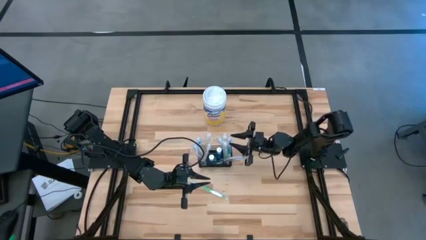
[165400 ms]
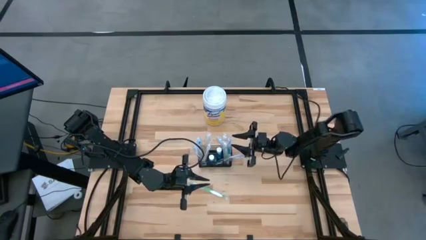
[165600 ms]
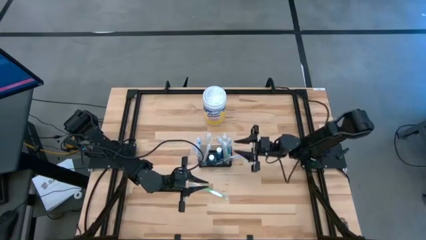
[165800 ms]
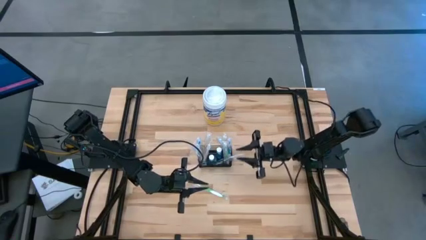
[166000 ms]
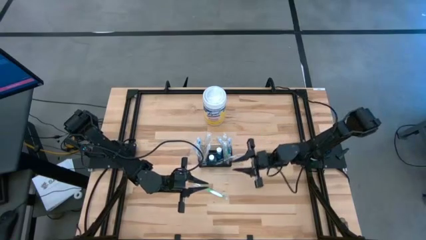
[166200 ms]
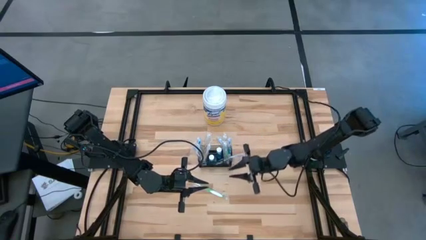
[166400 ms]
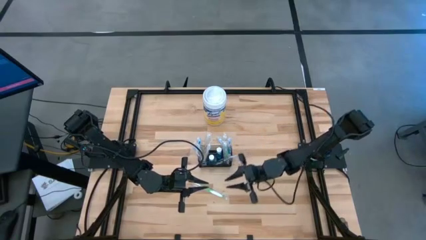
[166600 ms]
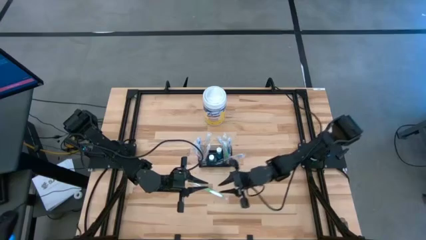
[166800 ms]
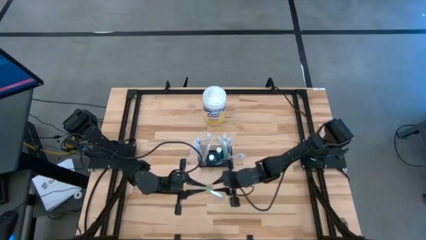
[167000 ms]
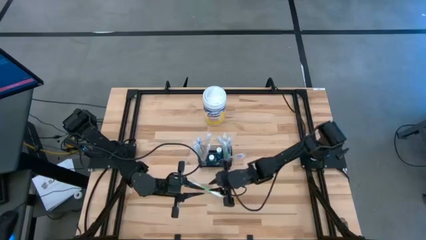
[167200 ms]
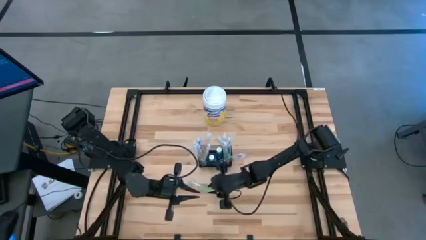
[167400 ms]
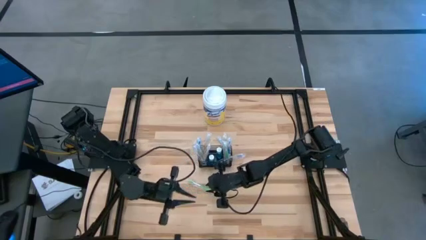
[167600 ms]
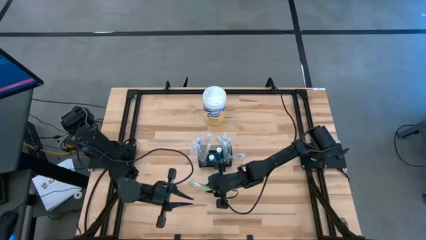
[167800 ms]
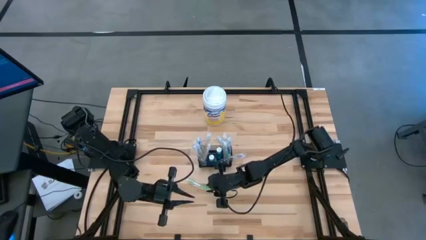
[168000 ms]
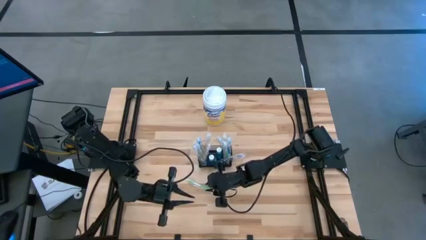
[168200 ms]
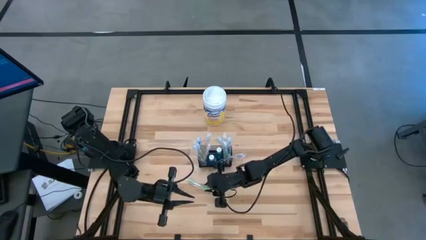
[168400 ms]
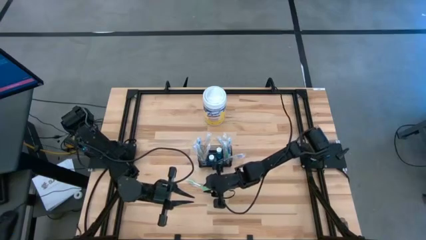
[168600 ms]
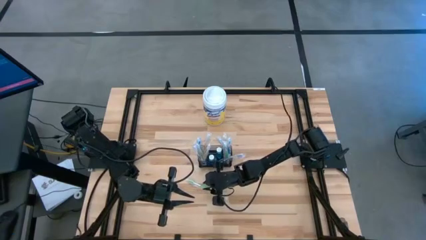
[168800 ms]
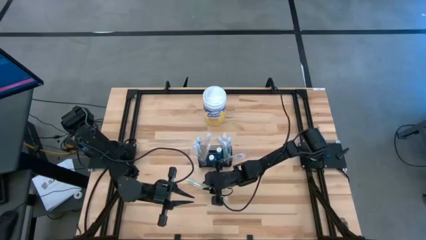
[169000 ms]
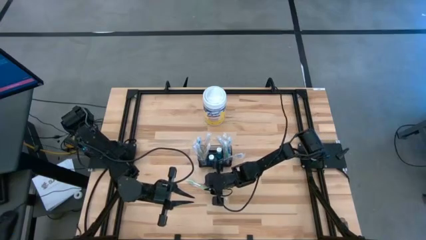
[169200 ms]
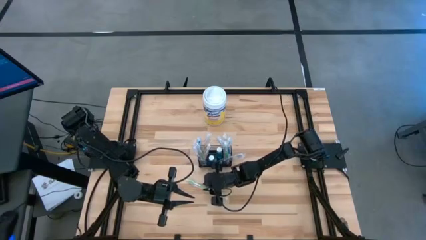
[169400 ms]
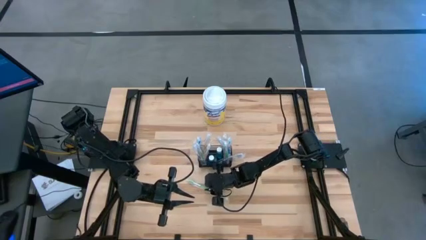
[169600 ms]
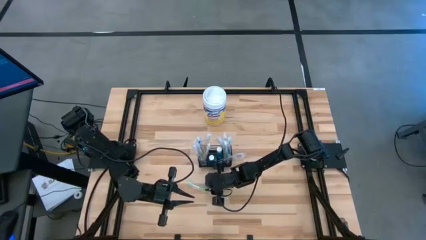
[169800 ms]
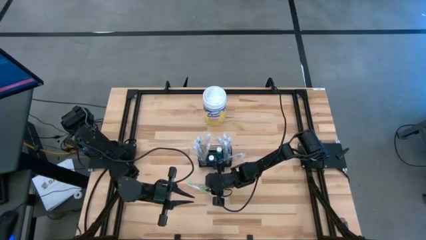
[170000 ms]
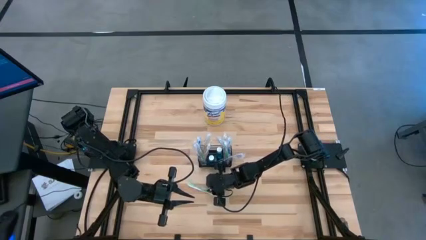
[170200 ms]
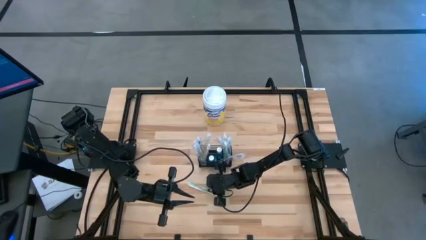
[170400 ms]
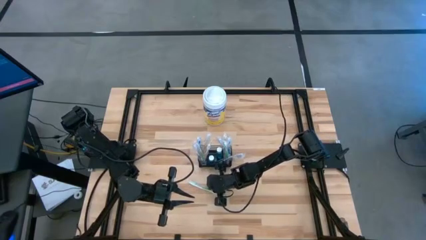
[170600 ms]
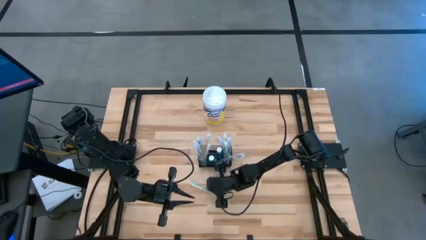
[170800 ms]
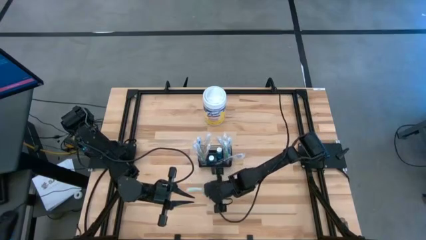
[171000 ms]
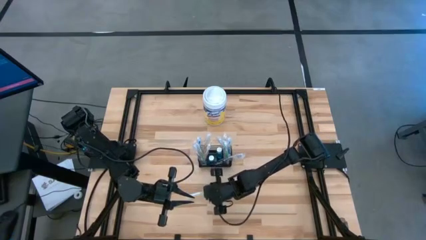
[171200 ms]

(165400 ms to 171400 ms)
Task: Pick & Place toothbrushing station
Put the green toothbrush into the mesh organizer

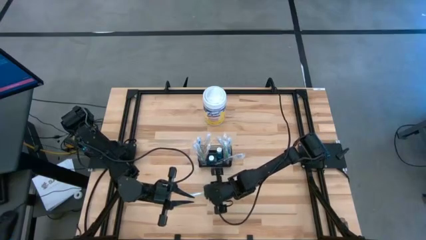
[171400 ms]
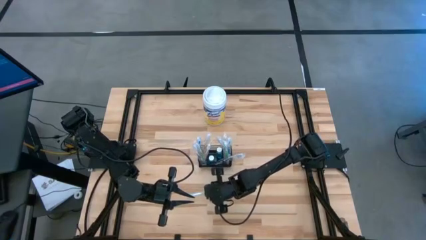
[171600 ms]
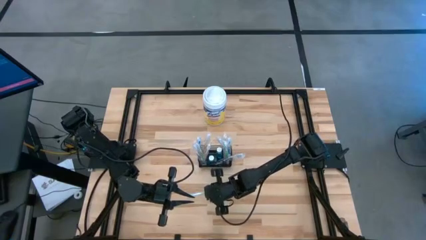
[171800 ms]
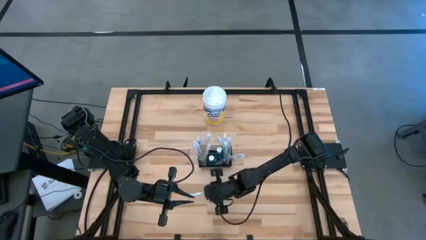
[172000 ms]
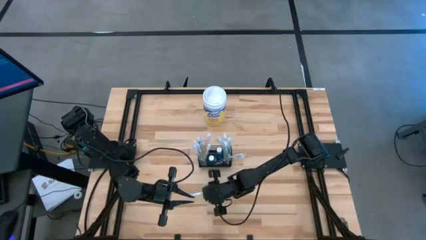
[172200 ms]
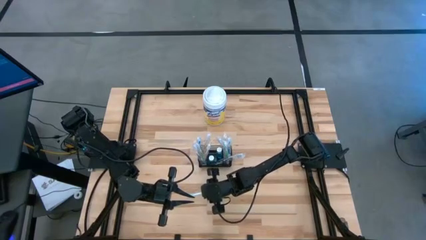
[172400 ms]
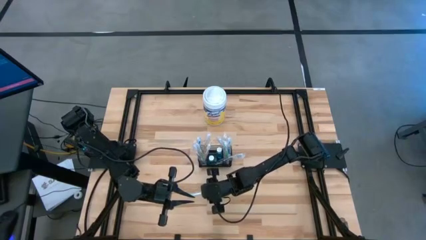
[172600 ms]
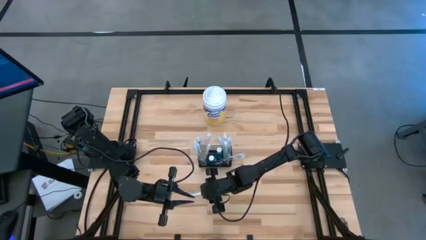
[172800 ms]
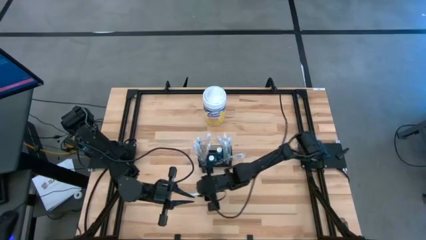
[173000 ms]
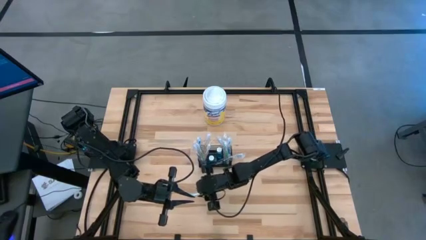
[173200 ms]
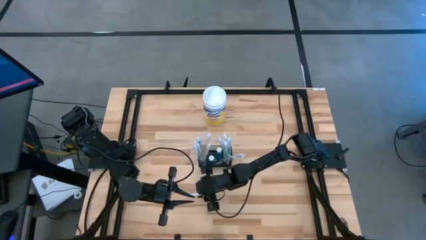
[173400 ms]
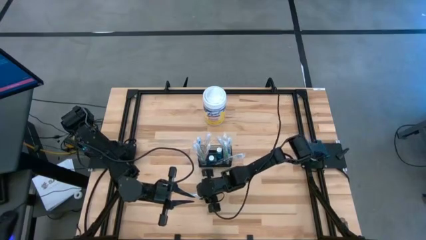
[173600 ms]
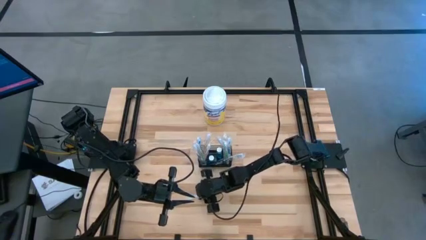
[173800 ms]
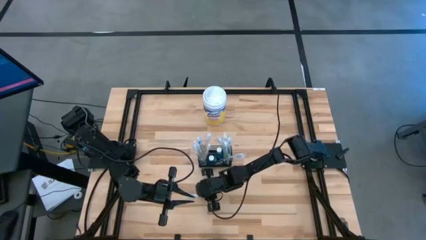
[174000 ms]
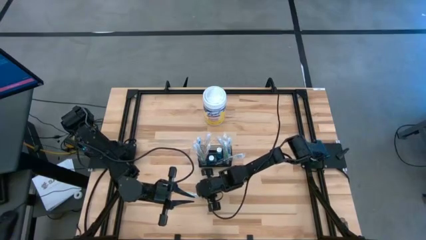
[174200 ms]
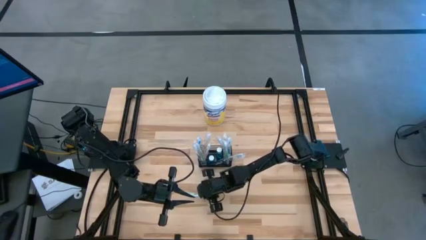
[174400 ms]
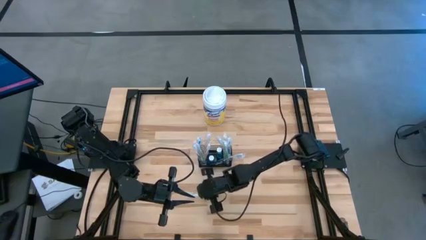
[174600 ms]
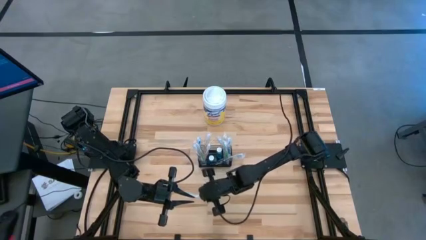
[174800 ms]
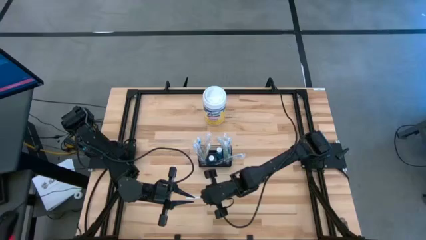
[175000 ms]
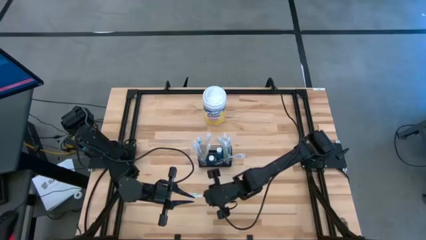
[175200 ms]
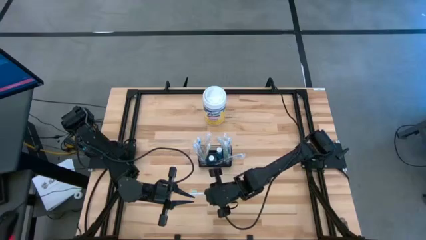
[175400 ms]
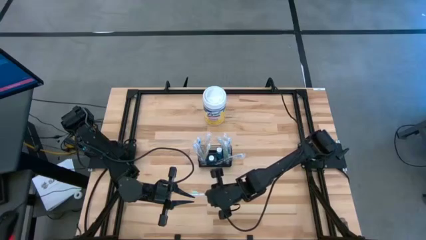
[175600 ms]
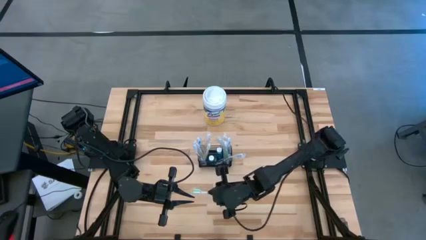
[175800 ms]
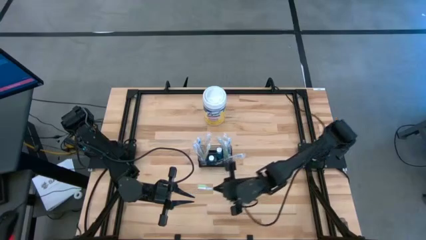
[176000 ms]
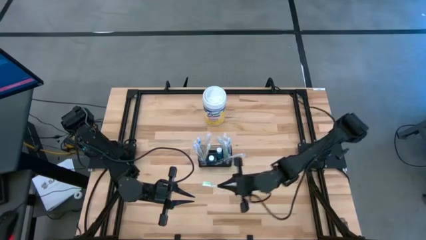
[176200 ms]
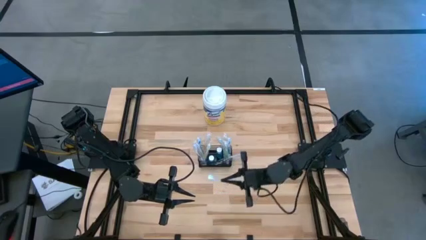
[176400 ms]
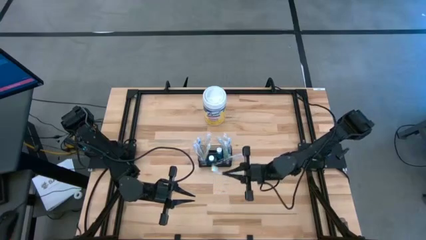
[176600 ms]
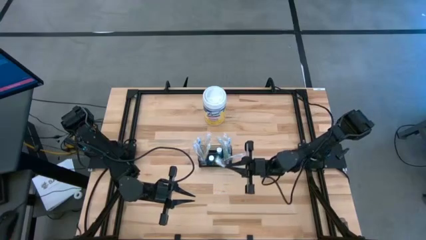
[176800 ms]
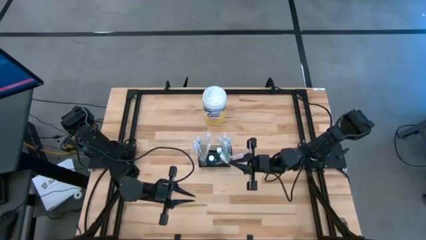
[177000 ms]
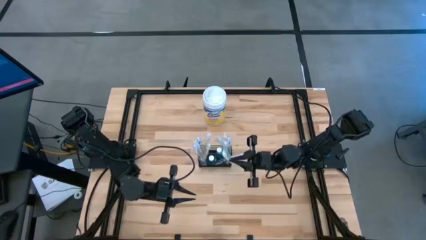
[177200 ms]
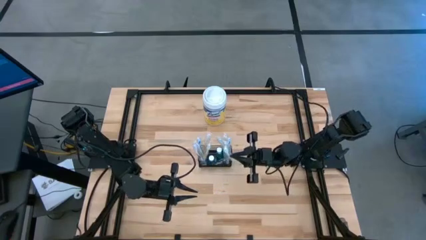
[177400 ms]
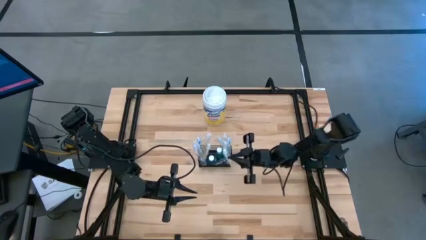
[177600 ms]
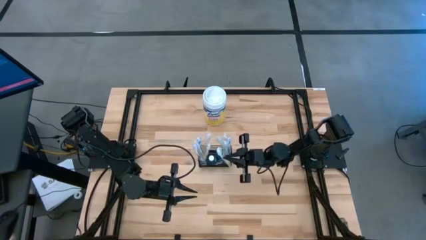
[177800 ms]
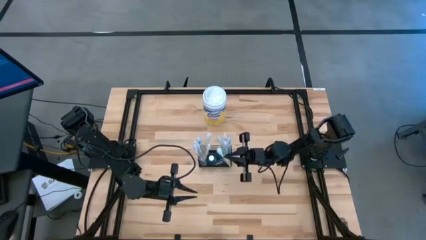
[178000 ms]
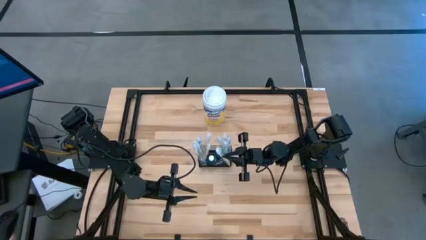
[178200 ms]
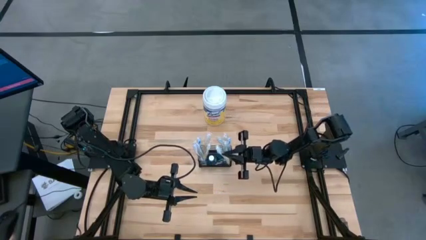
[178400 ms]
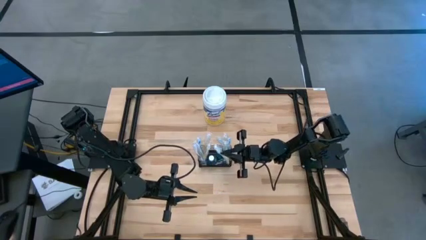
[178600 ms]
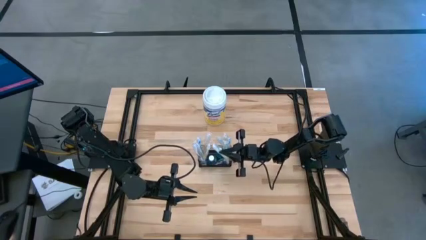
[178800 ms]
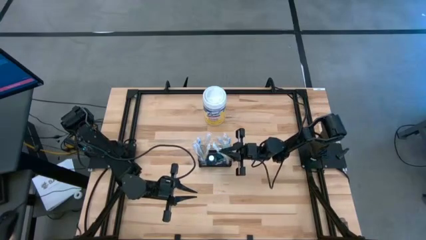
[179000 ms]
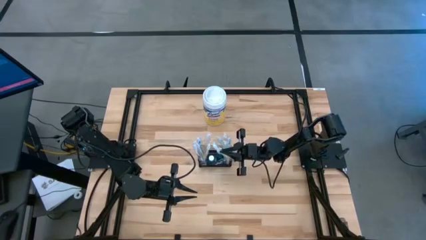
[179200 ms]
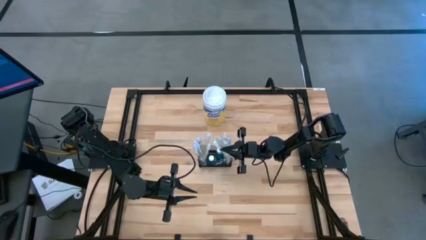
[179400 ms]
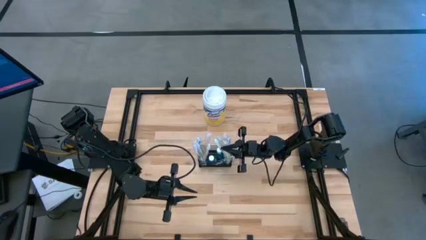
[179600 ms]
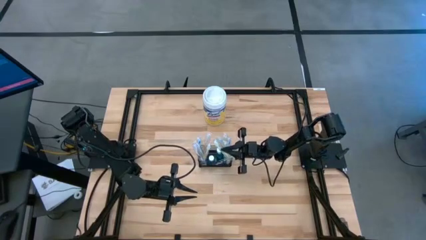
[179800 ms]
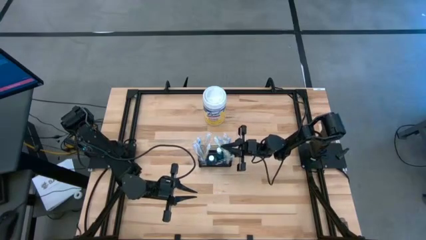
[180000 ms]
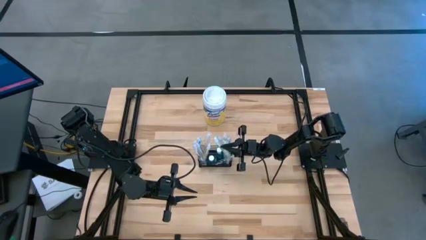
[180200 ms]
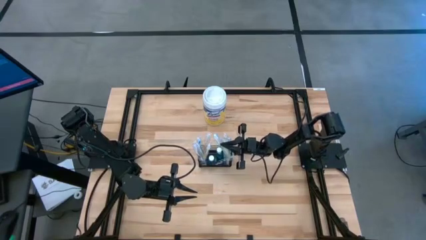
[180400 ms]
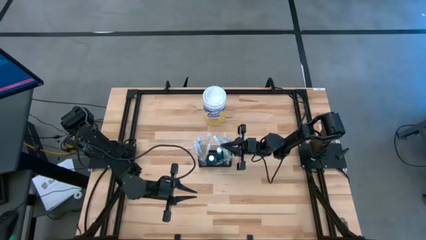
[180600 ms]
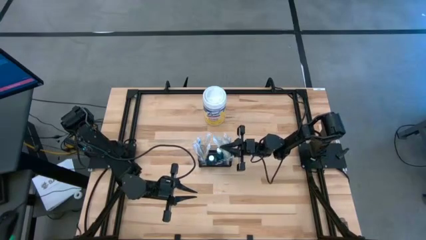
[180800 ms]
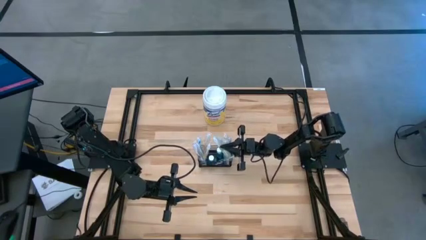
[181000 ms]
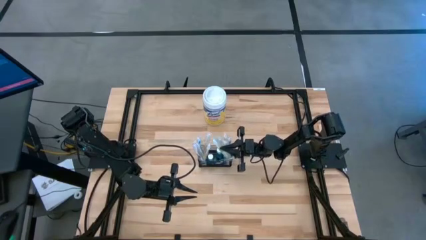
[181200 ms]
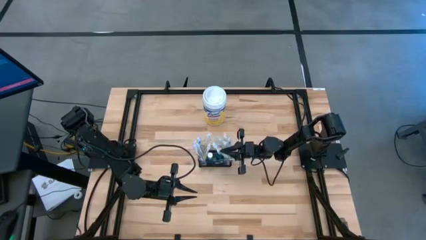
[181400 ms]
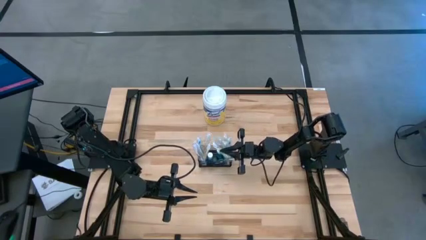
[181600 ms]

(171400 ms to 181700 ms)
Put the green toothbrush into the mesh organizer

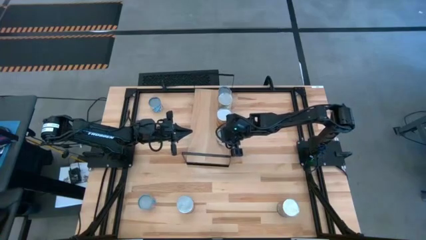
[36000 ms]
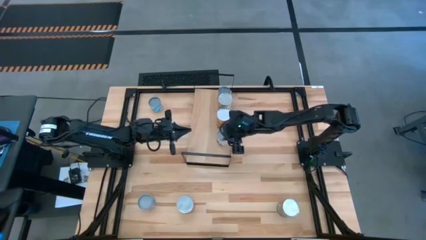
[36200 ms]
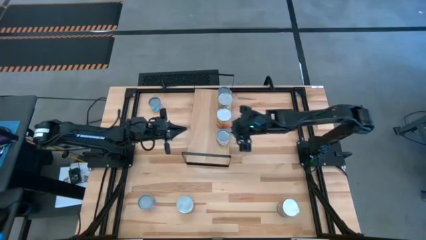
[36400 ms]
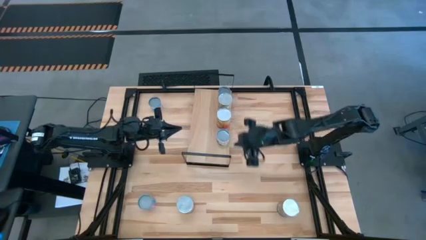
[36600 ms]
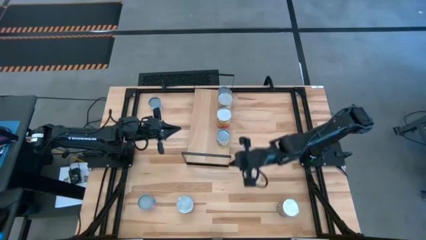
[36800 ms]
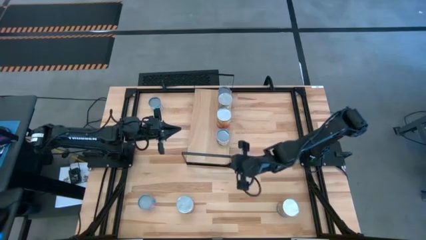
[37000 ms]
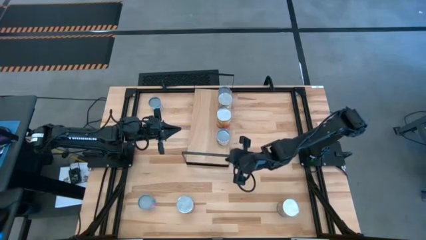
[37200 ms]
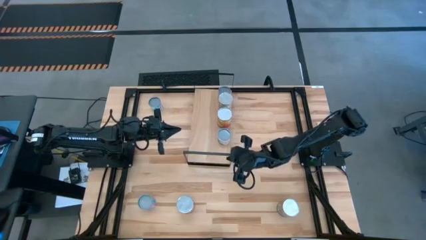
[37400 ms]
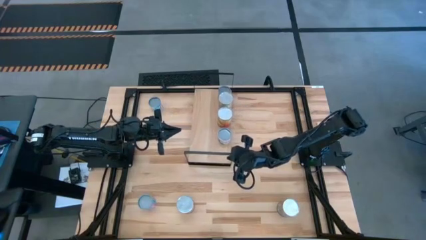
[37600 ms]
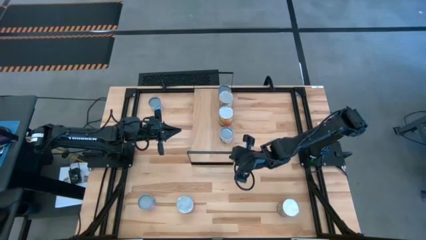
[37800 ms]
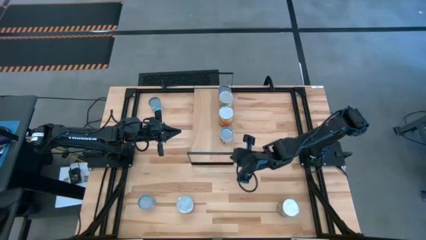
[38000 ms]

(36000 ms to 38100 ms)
Task: Pick and place cans onto a shelf
Adjust the shelf
